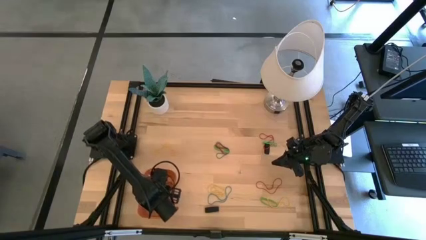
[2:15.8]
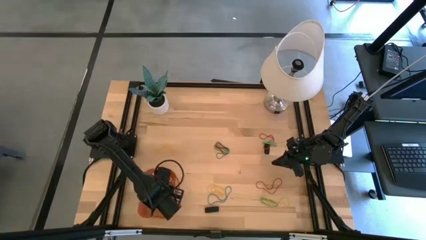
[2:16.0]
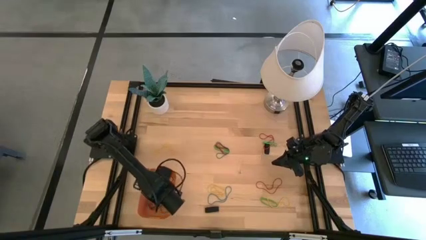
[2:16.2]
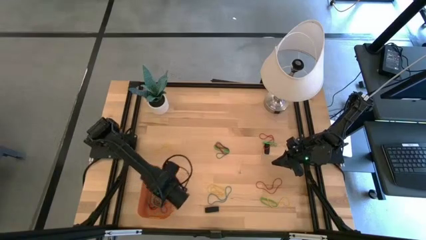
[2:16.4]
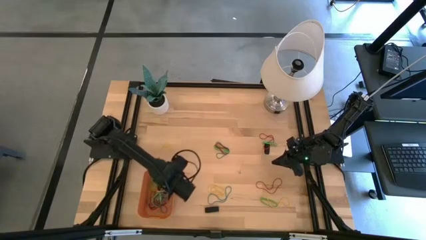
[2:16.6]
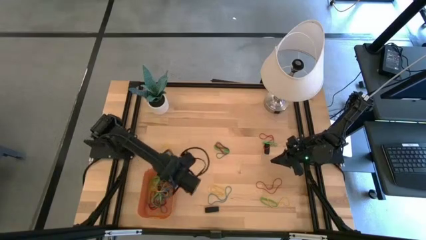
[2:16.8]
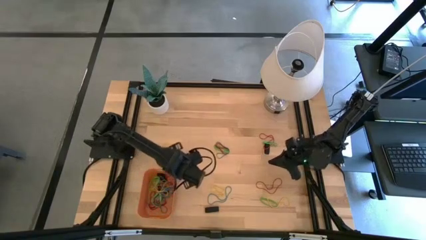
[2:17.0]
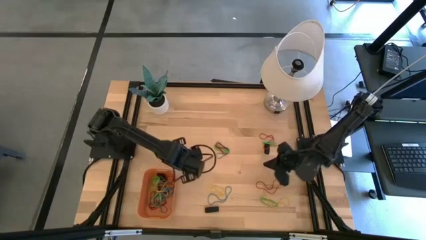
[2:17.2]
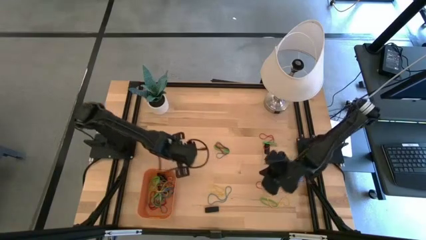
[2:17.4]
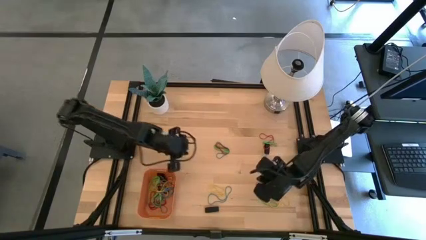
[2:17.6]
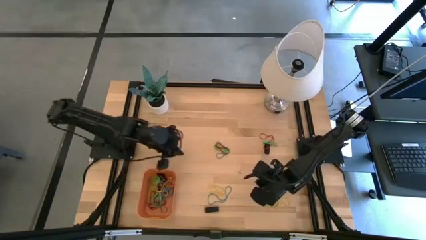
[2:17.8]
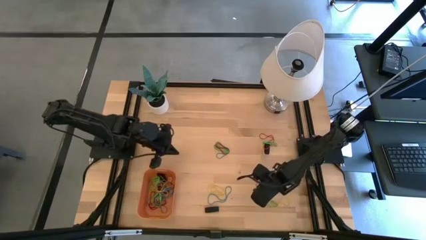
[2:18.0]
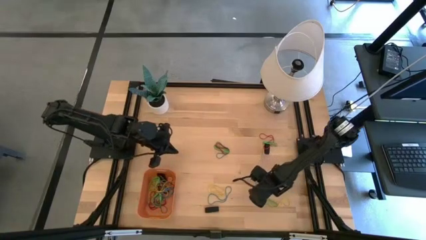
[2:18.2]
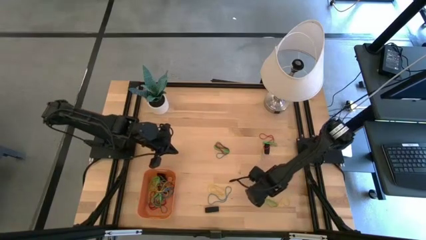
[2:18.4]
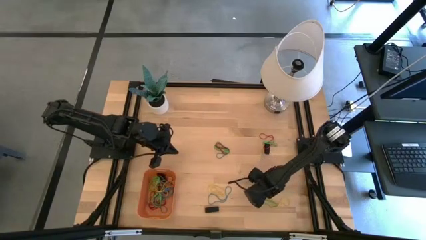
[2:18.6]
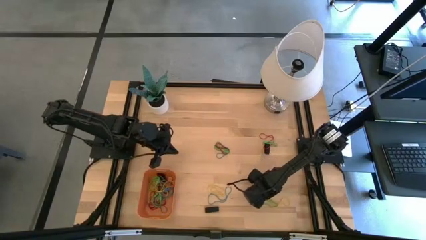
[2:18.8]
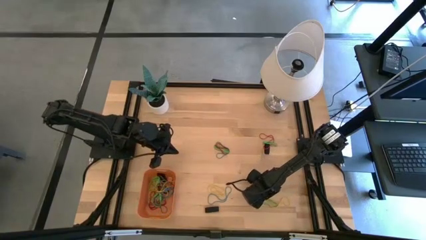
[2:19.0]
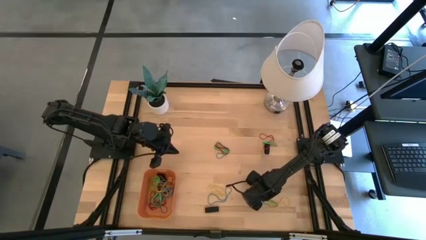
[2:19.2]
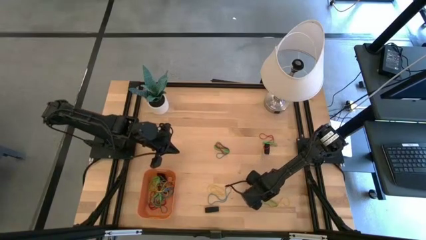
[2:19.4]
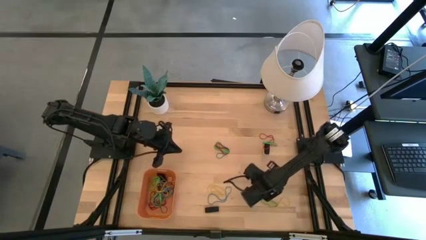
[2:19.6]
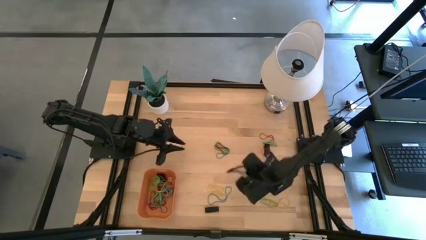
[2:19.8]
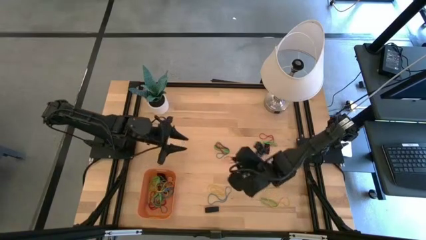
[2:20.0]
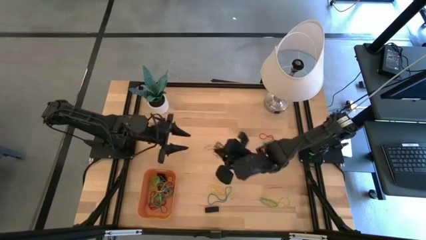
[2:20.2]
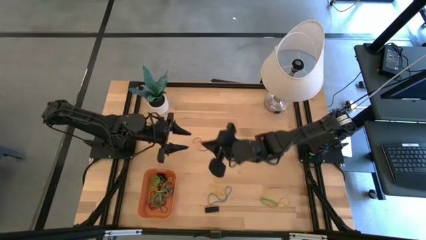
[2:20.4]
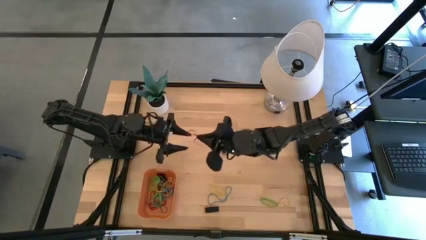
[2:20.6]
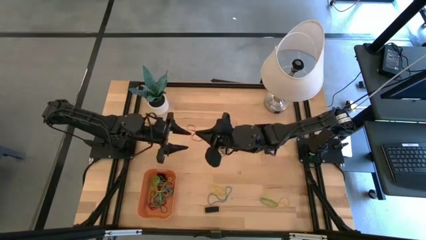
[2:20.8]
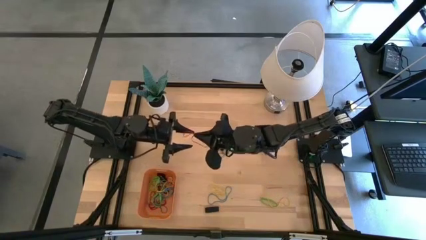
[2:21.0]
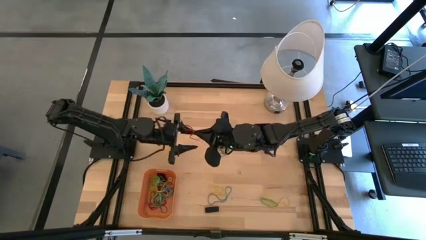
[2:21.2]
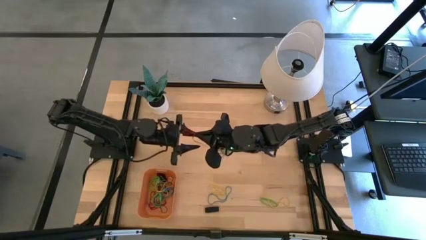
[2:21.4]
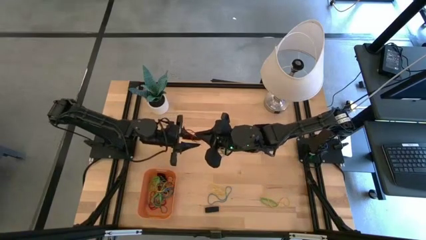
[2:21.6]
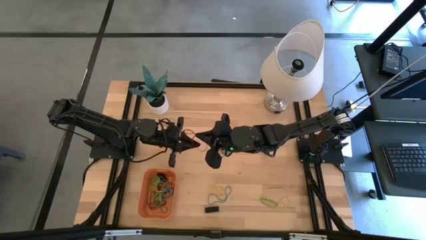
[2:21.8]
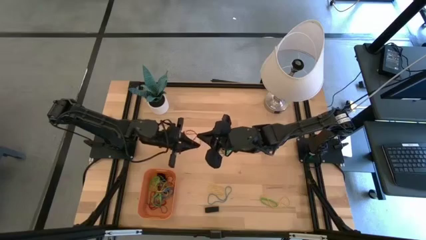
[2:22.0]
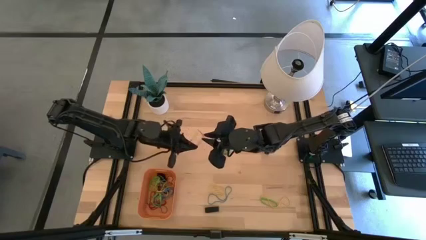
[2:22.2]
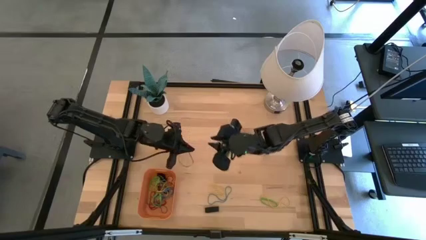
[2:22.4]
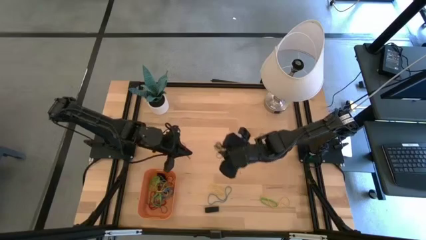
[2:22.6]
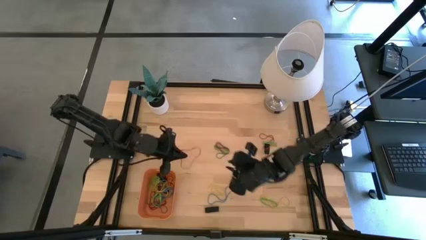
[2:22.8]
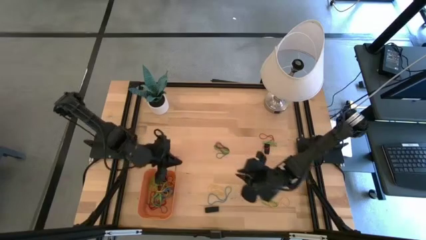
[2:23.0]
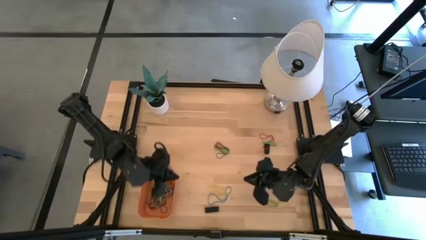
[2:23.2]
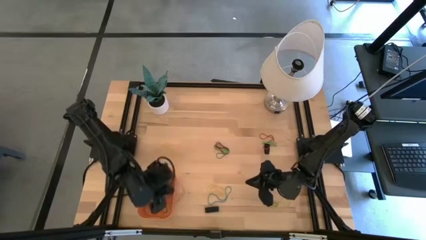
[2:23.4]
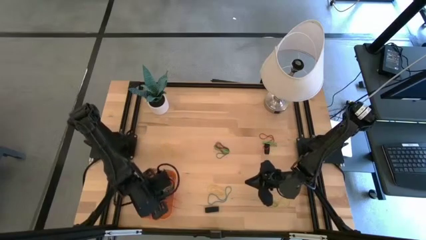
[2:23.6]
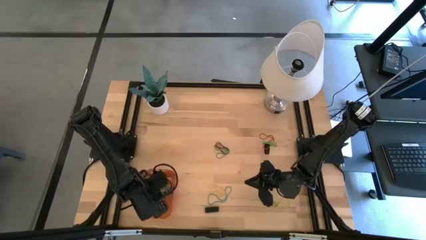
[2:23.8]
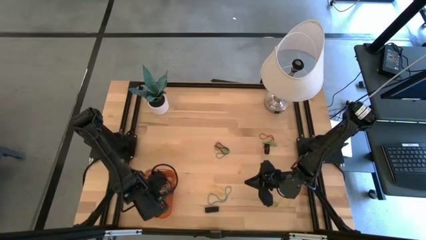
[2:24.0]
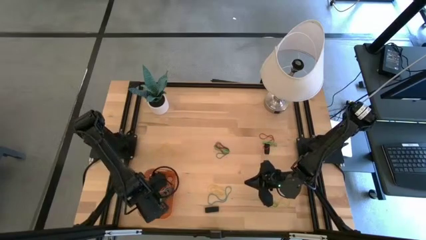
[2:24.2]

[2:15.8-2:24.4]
Task: Pick and place rubber bands into bin
Put the red rubber band into the orange bin

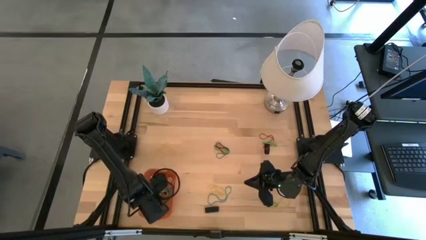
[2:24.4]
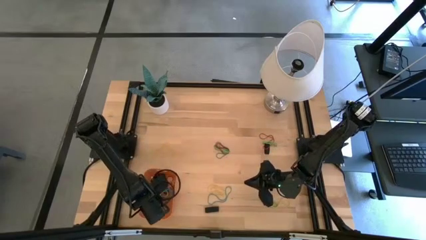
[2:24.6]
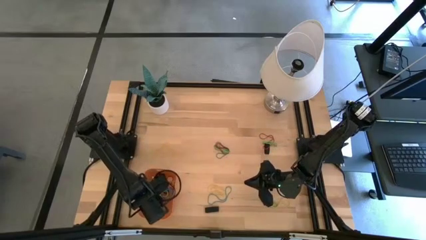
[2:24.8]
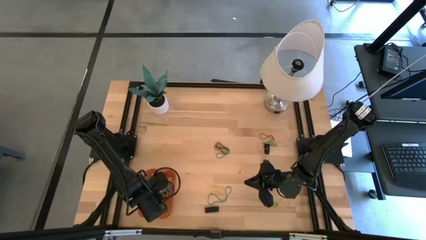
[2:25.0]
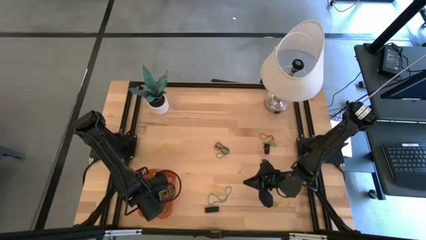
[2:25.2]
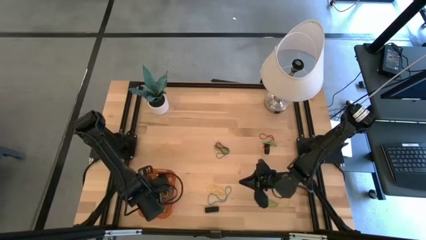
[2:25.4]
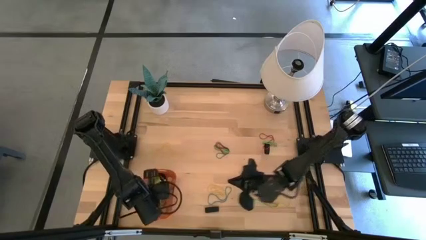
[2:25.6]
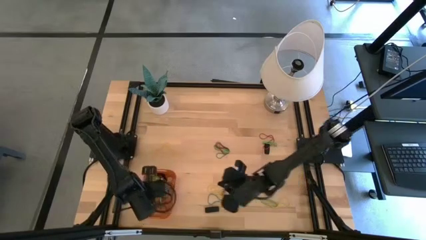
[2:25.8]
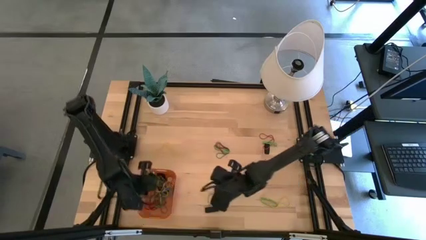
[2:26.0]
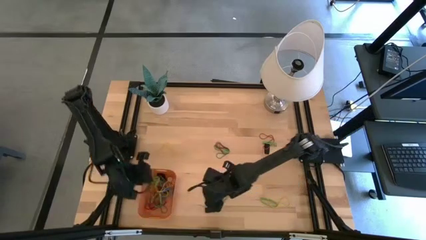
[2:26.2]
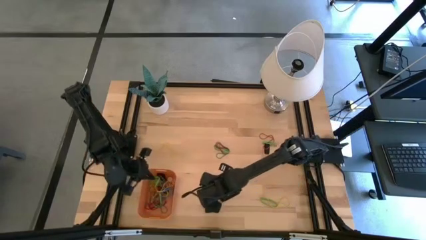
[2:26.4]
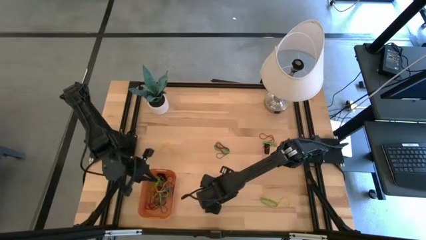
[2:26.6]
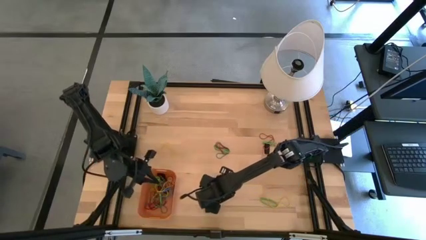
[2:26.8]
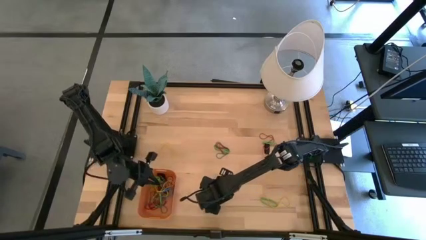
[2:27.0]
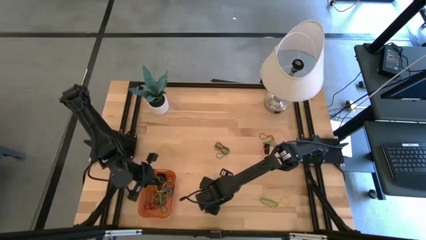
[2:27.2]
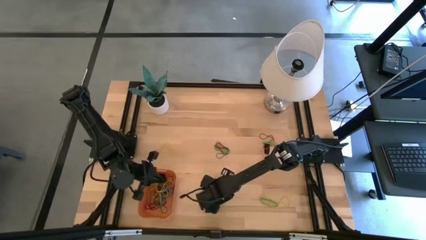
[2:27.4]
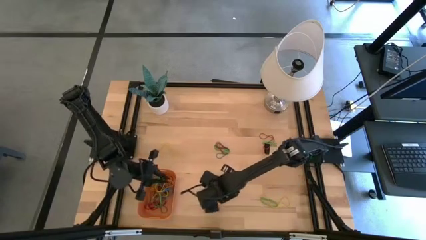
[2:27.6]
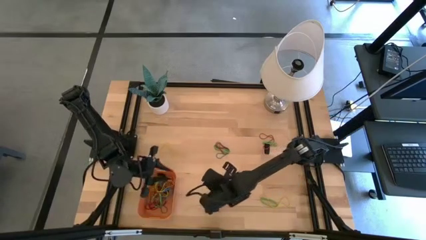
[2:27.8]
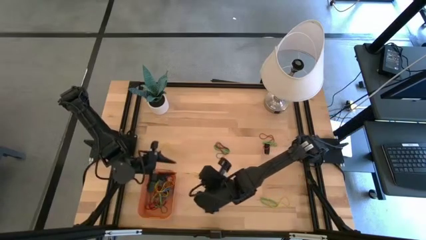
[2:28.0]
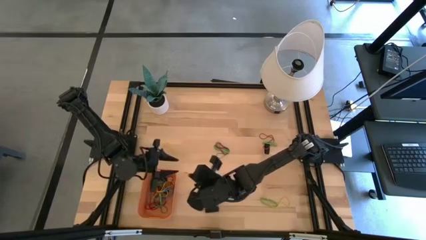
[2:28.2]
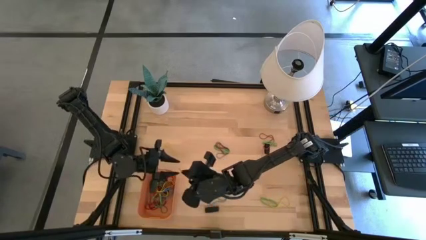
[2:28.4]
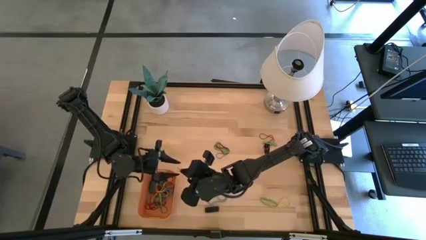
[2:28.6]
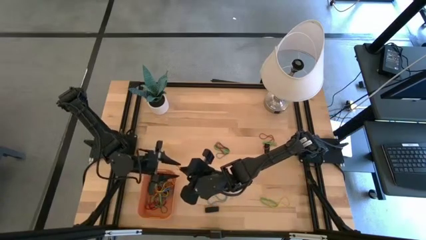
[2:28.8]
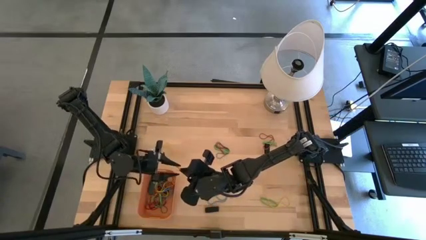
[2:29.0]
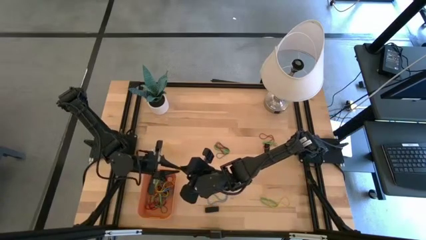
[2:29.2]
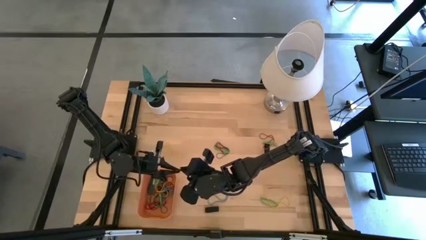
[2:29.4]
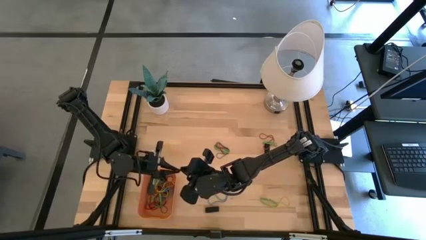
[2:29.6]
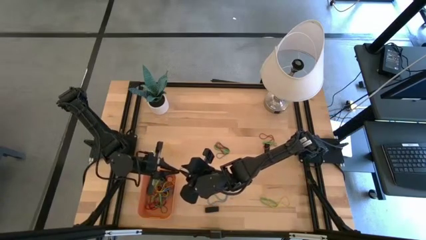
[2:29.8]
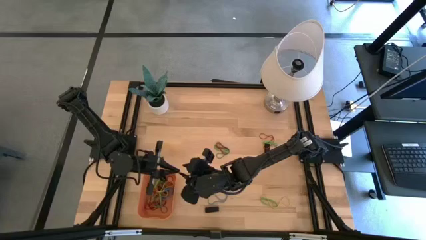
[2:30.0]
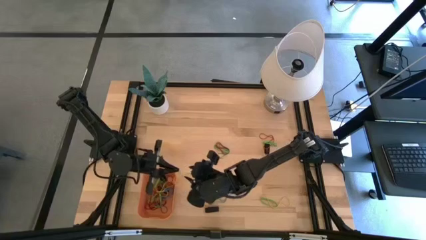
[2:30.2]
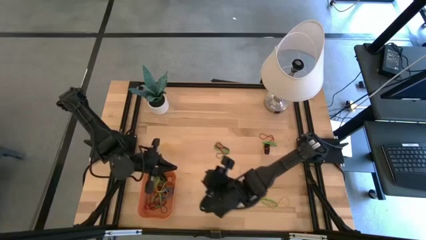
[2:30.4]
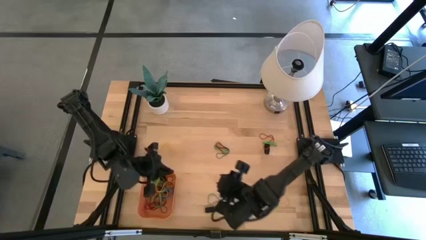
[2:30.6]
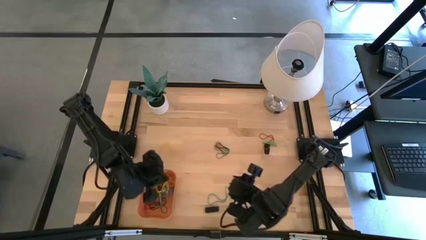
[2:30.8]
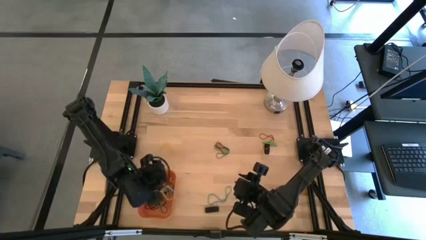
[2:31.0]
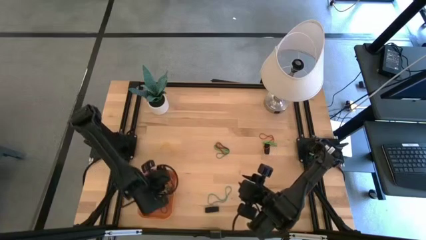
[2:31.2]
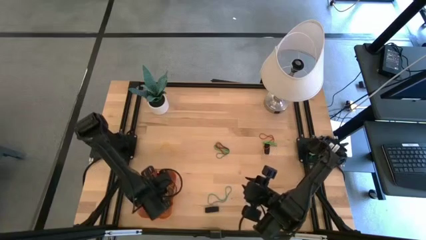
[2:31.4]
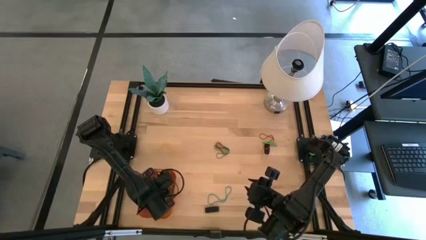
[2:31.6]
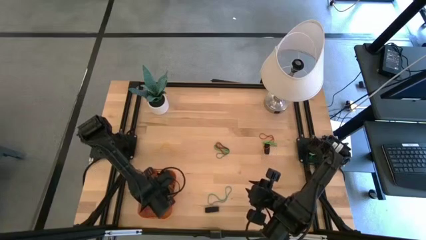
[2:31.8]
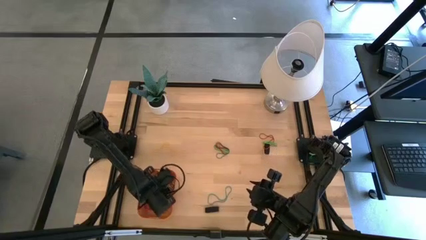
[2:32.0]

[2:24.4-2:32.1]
Put the yellow rubber band into the orange bin
